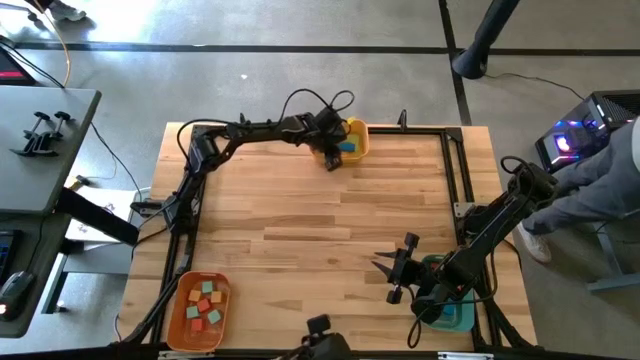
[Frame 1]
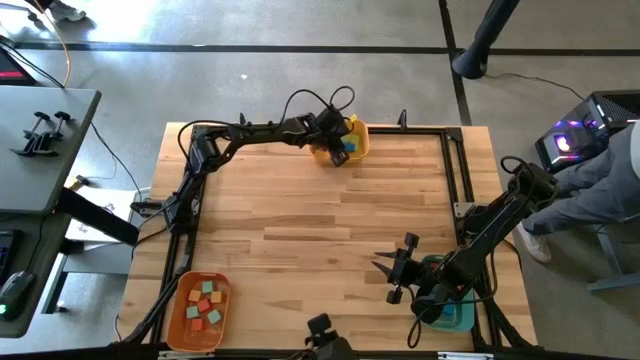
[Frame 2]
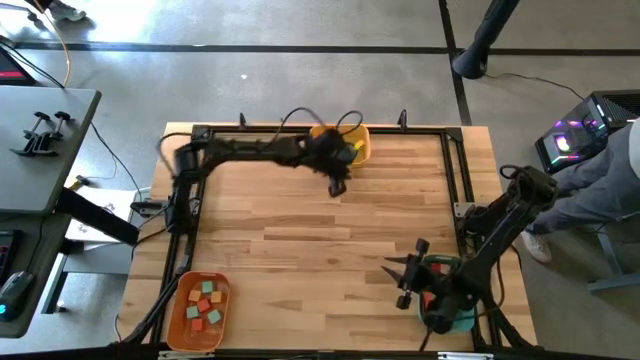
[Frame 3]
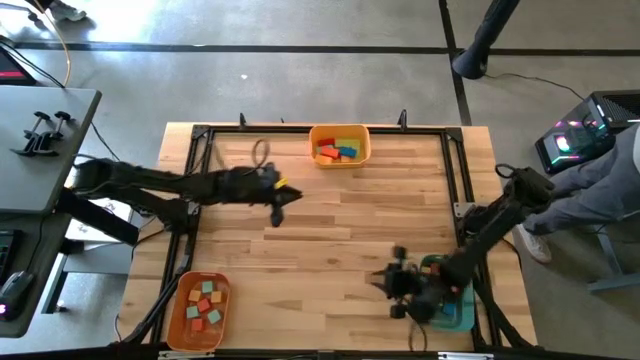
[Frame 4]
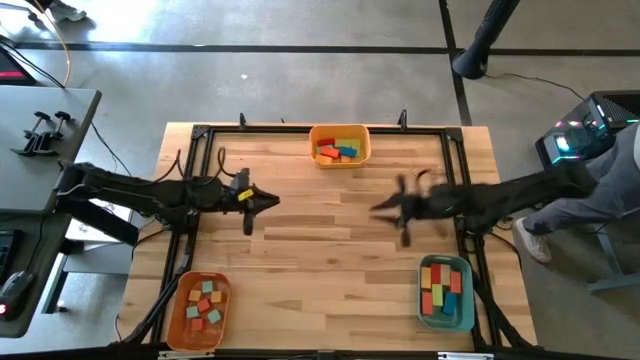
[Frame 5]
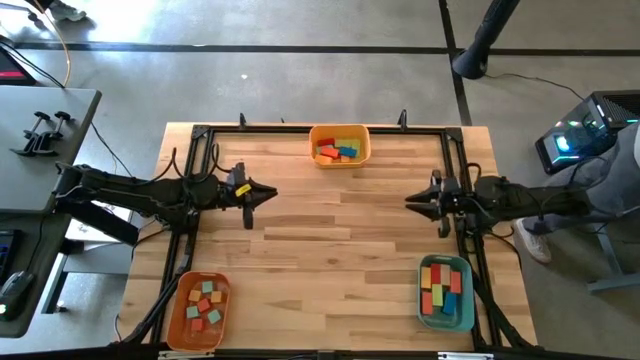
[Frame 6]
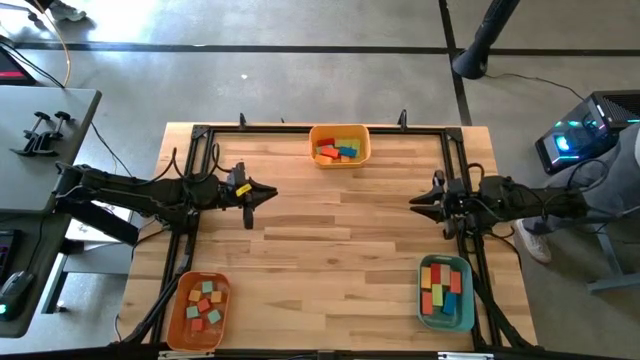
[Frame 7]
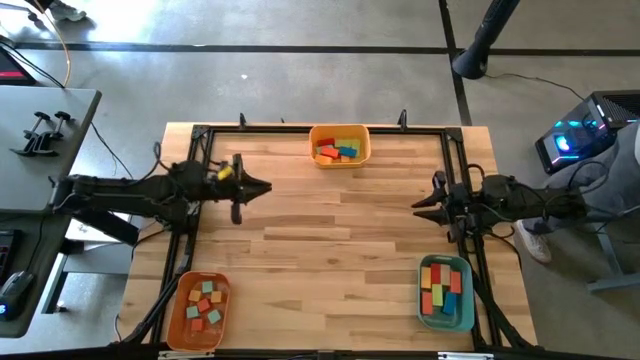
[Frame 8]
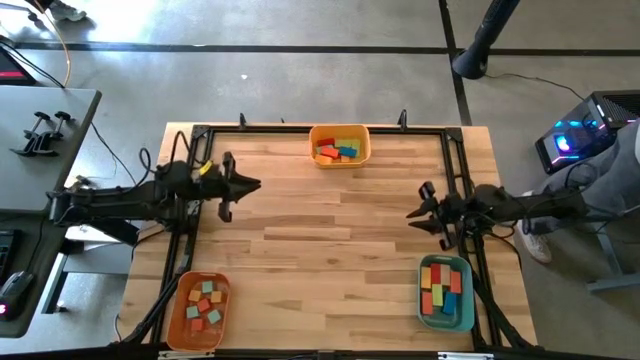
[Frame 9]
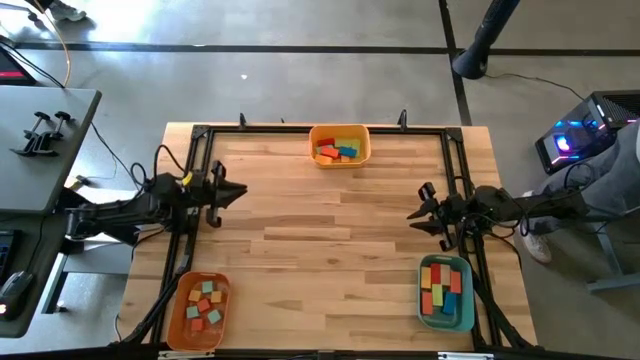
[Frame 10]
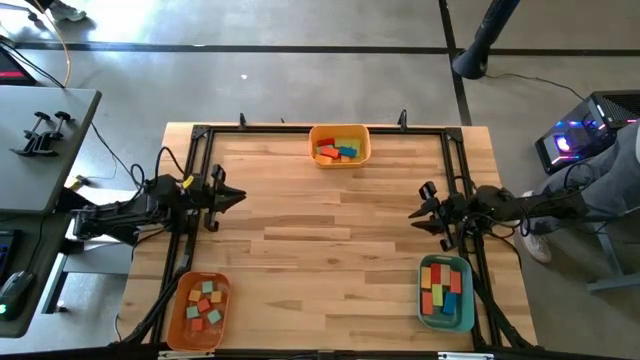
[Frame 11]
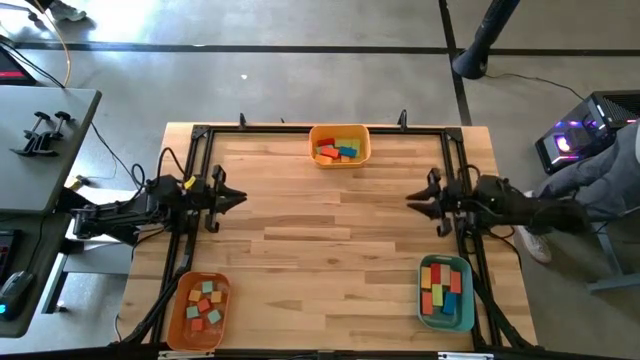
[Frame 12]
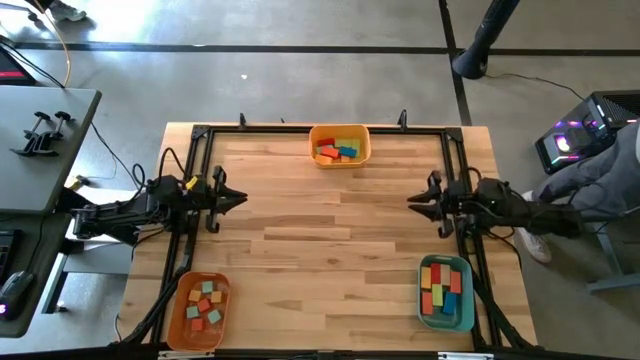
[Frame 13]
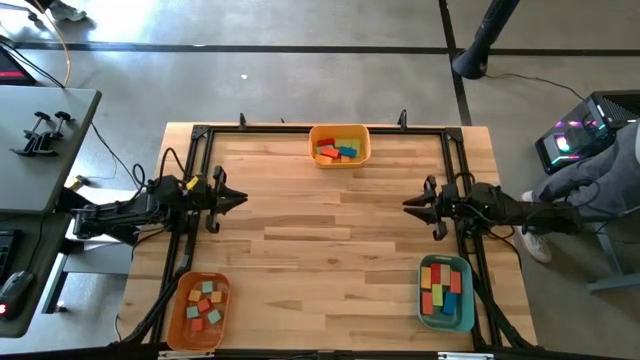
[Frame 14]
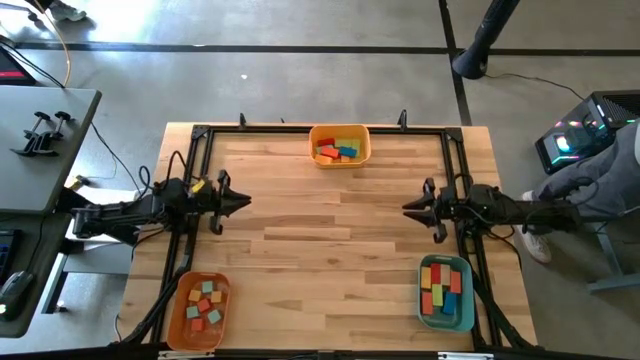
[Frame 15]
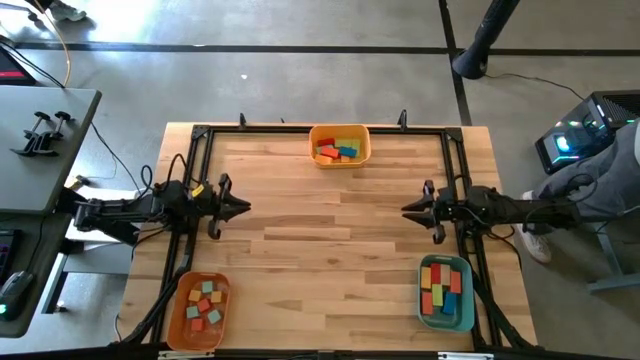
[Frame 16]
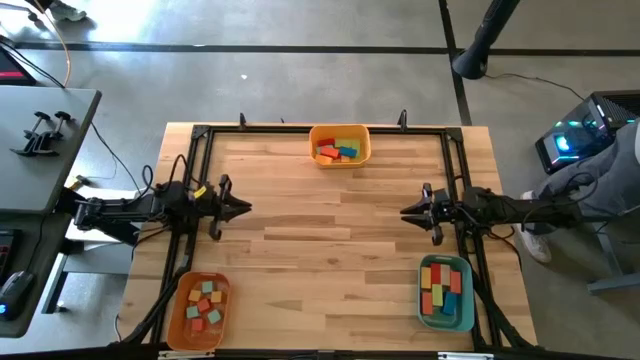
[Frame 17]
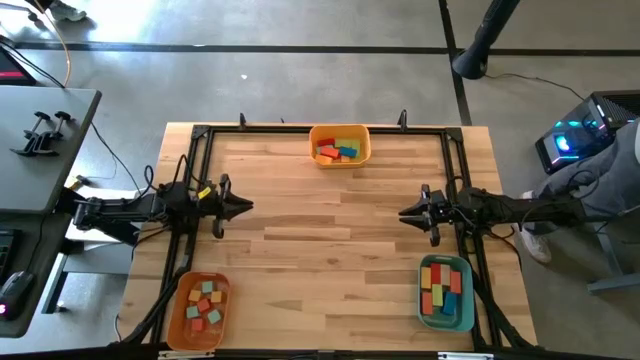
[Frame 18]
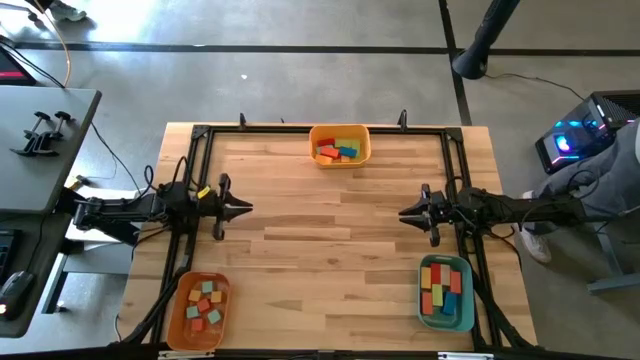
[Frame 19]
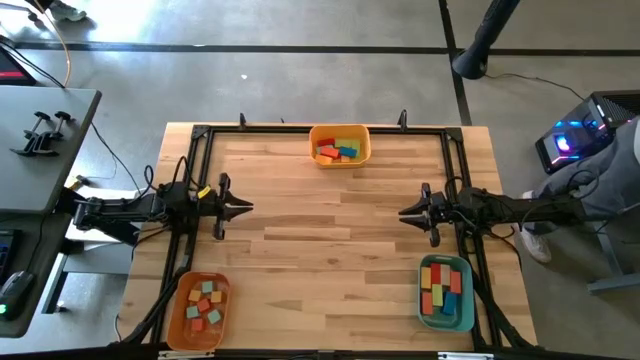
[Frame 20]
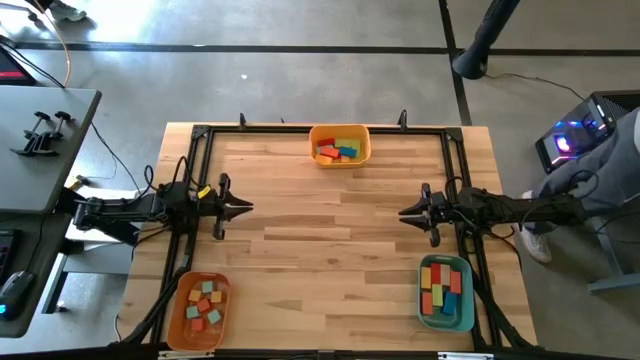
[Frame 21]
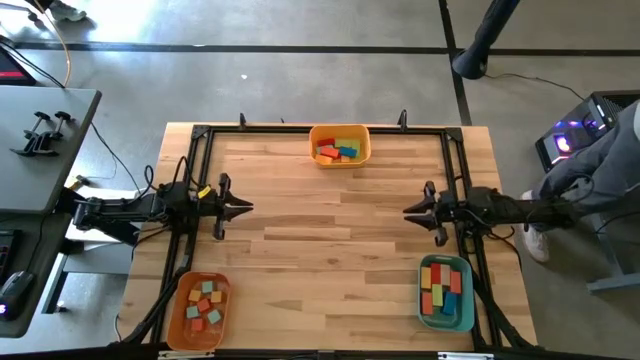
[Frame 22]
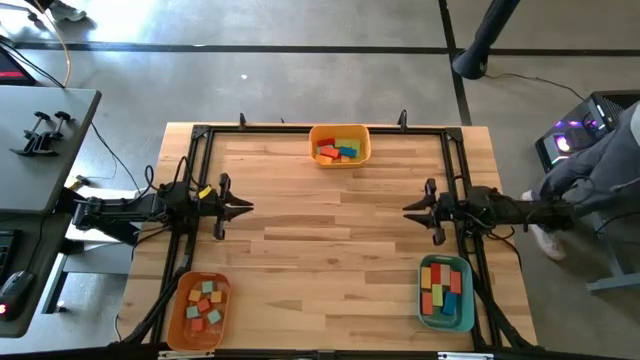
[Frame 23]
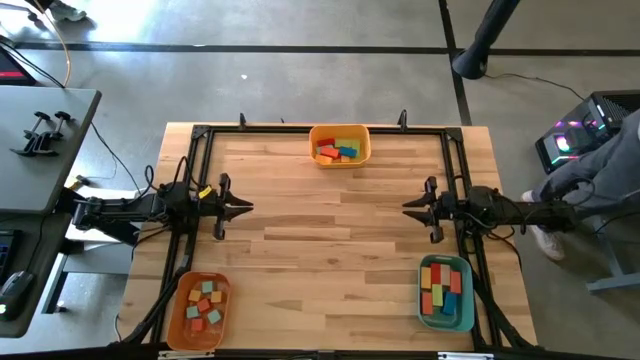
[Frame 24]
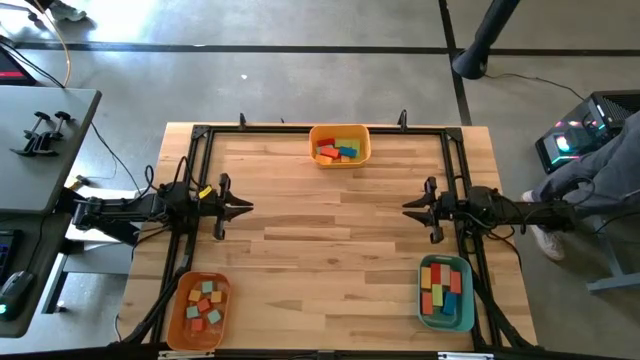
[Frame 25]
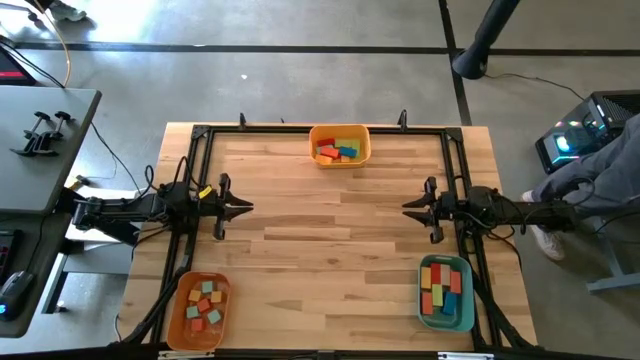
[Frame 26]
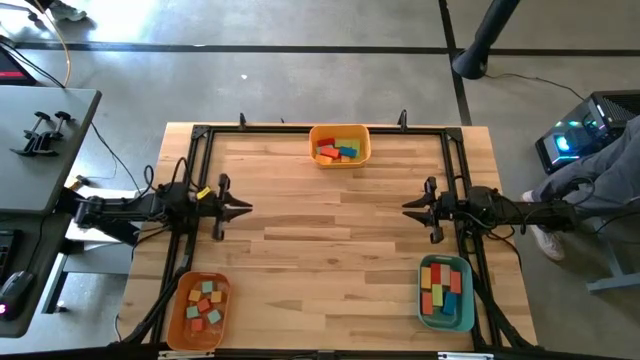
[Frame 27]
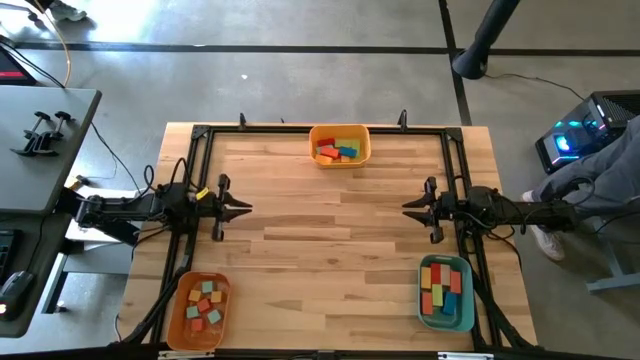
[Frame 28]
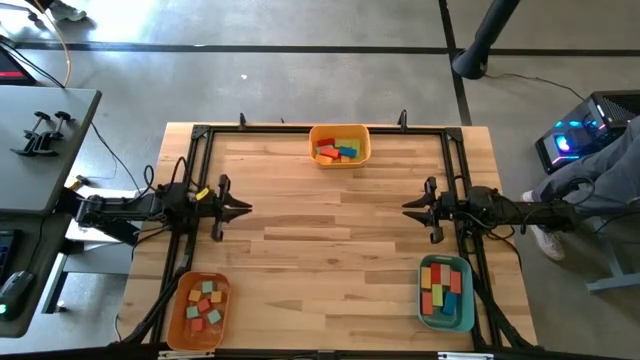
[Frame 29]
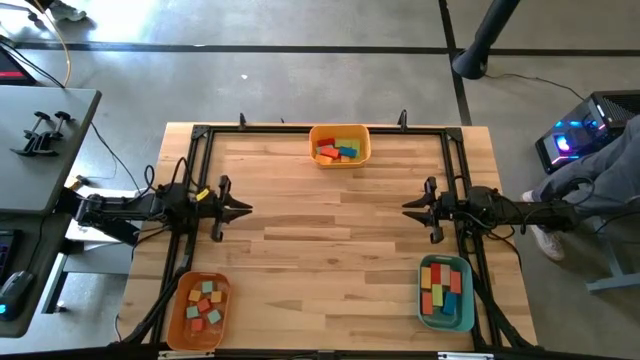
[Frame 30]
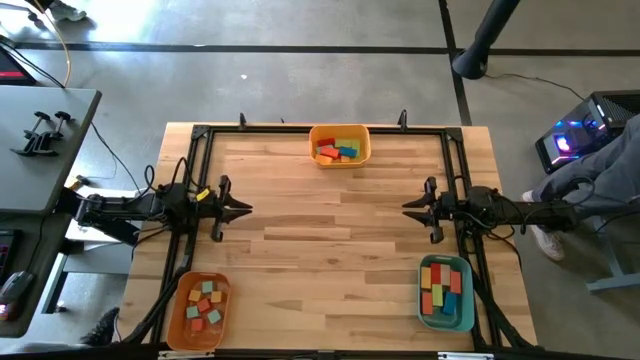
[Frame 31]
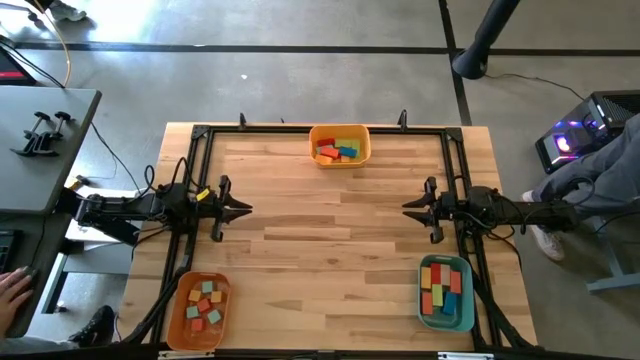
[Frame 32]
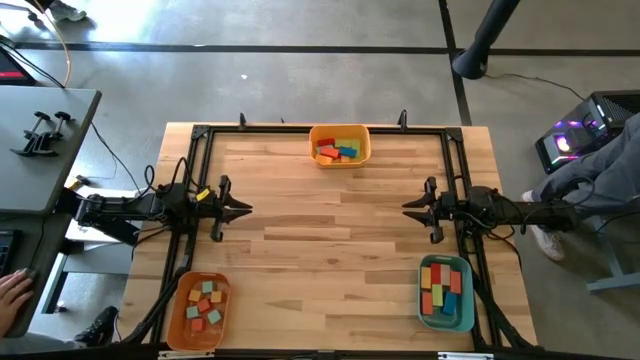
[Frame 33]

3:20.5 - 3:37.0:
Task: Sort blocks by size
Return to Home Position

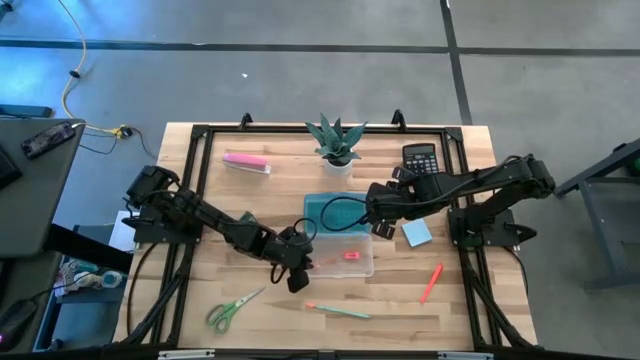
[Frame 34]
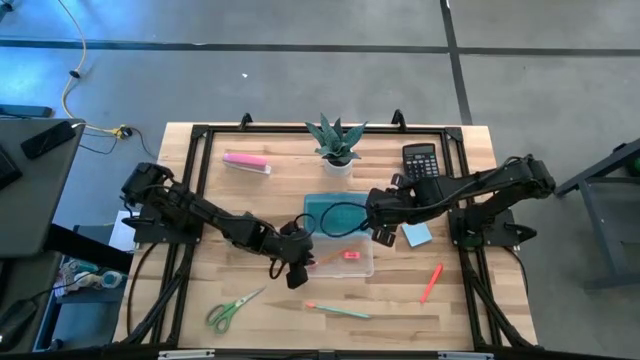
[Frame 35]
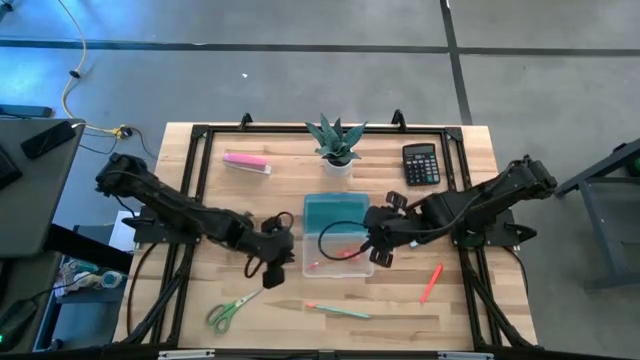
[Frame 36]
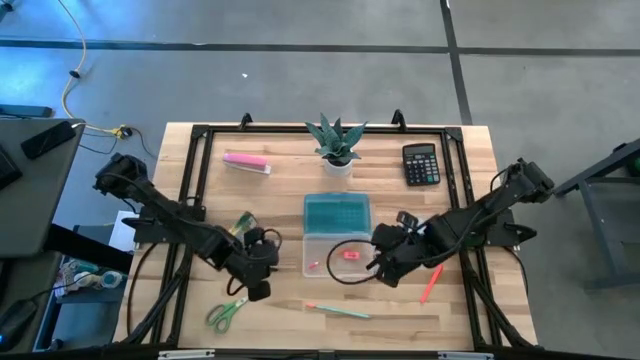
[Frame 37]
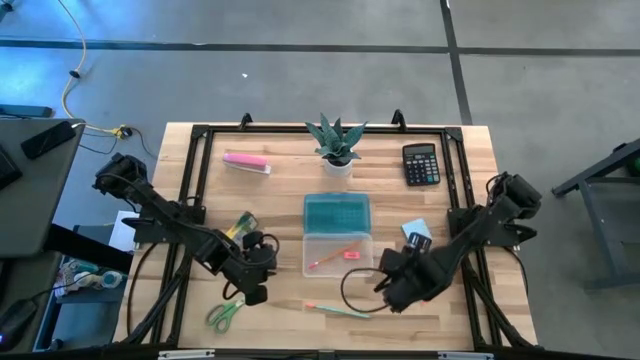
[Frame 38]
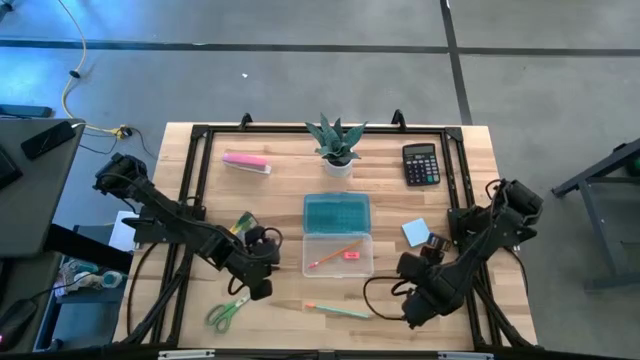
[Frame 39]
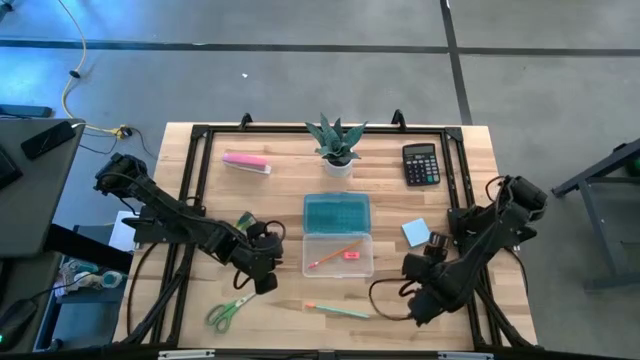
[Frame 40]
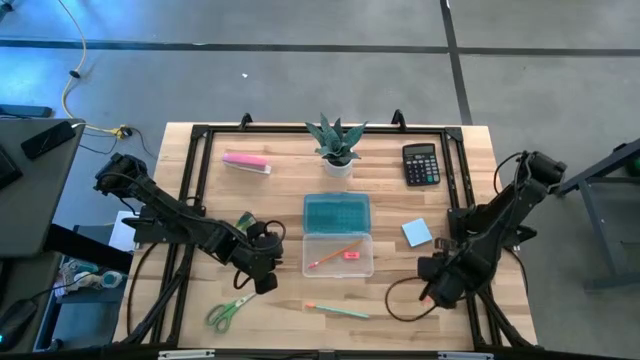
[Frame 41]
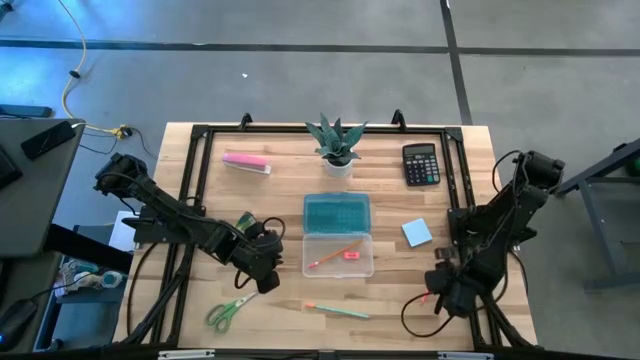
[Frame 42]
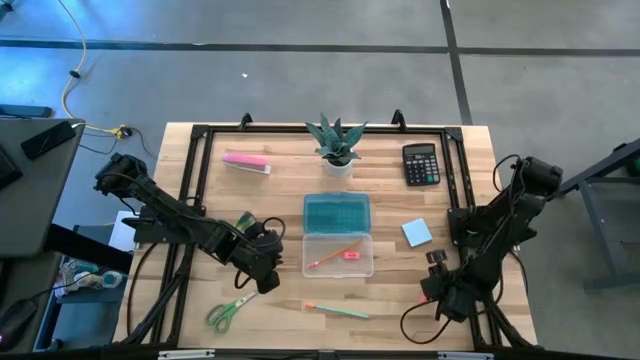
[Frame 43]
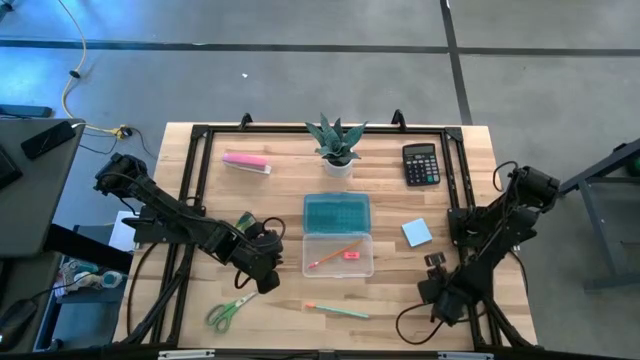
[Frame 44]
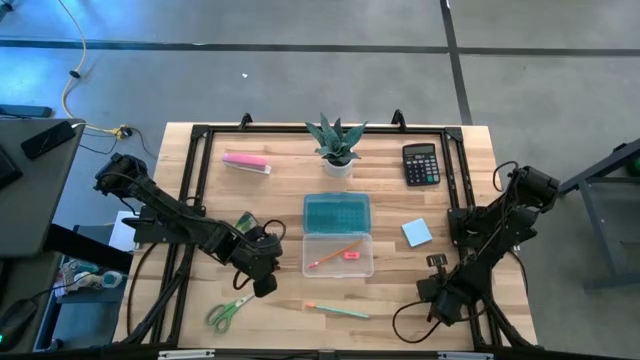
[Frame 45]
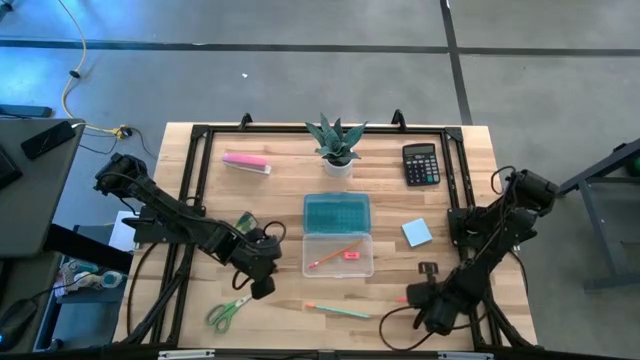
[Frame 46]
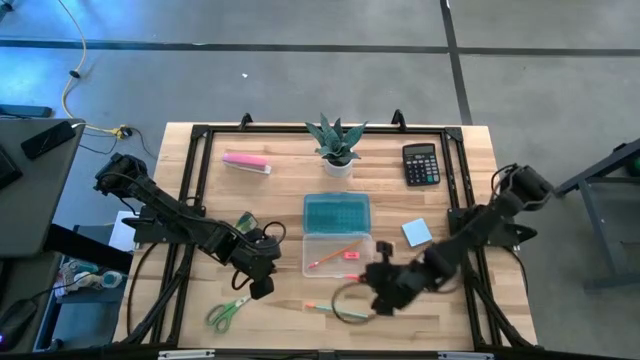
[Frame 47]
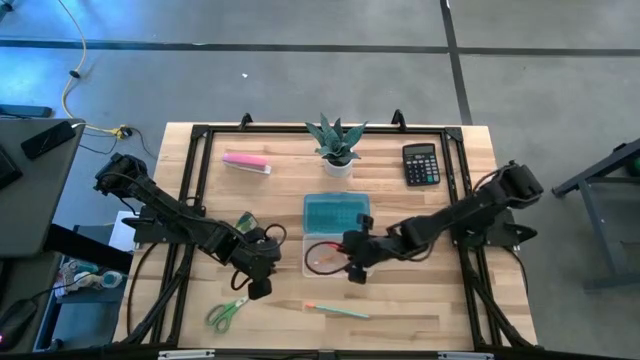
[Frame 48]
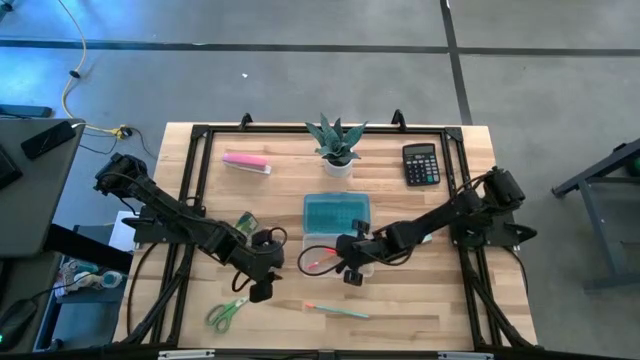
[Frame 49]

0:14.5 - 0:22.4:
Task: Pack school essentials
Put the orange pen into the blue supply box
